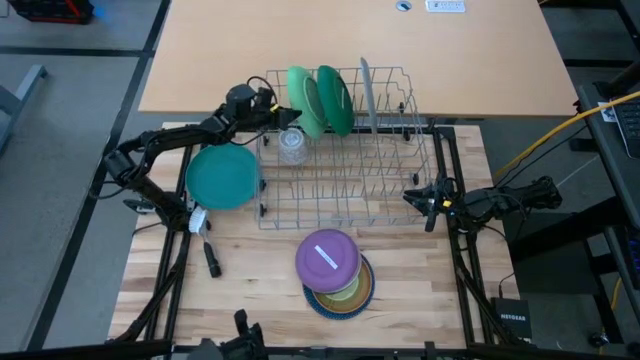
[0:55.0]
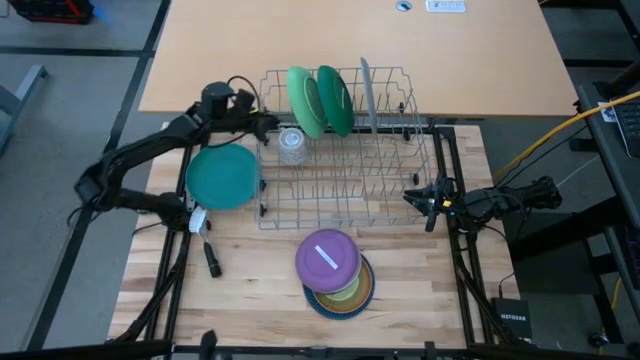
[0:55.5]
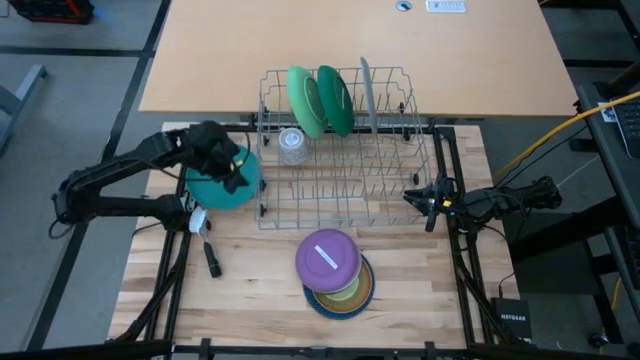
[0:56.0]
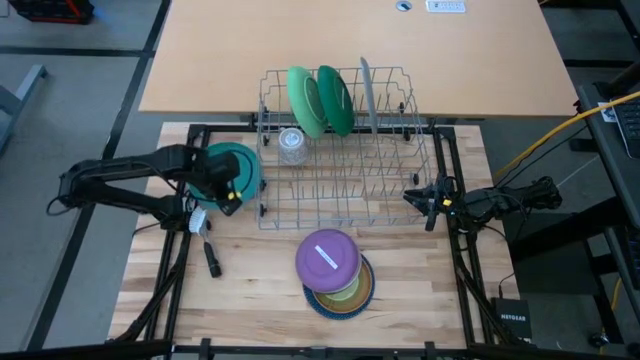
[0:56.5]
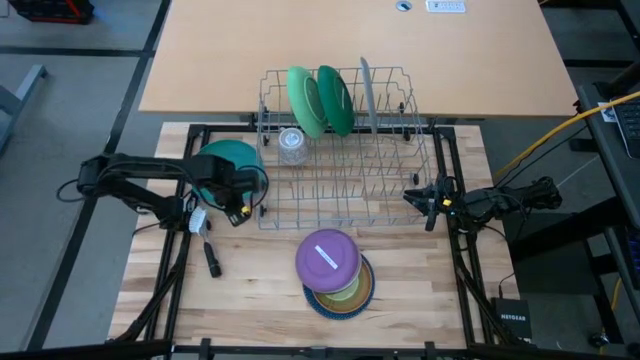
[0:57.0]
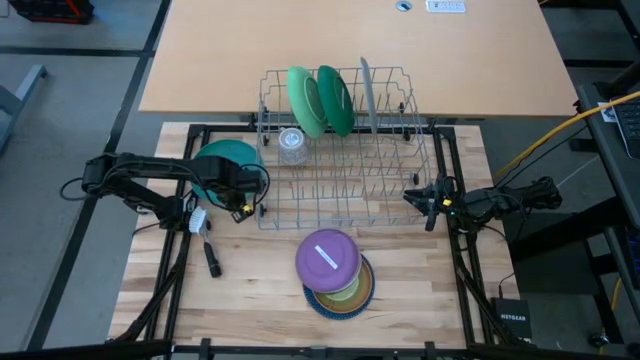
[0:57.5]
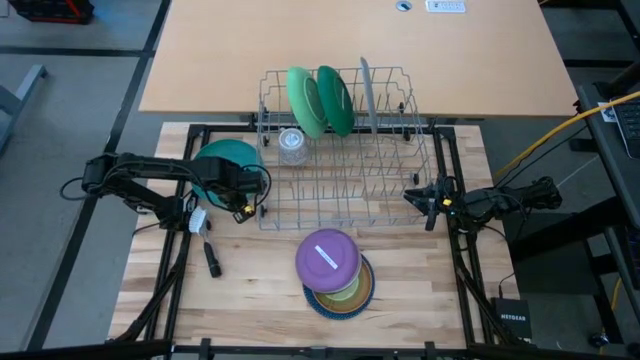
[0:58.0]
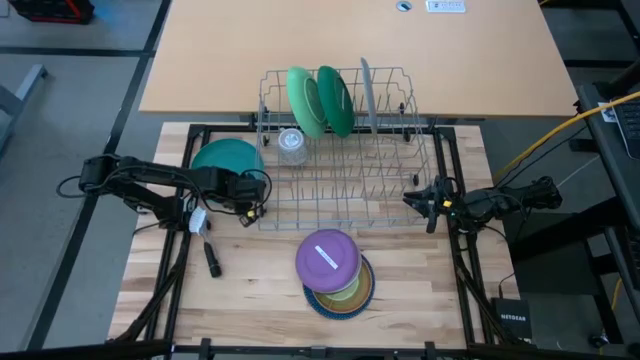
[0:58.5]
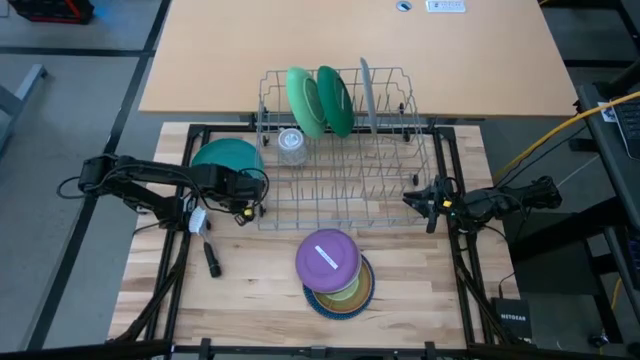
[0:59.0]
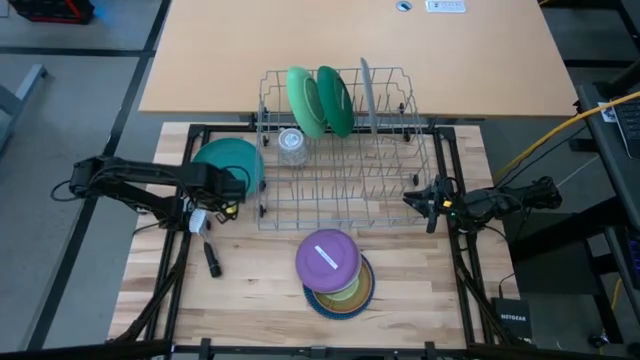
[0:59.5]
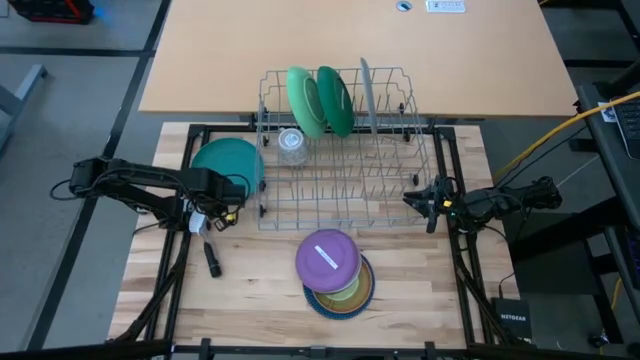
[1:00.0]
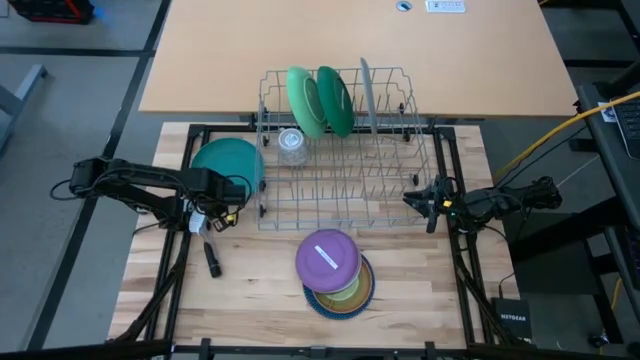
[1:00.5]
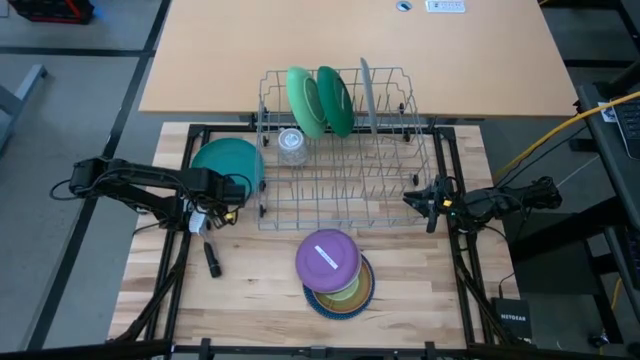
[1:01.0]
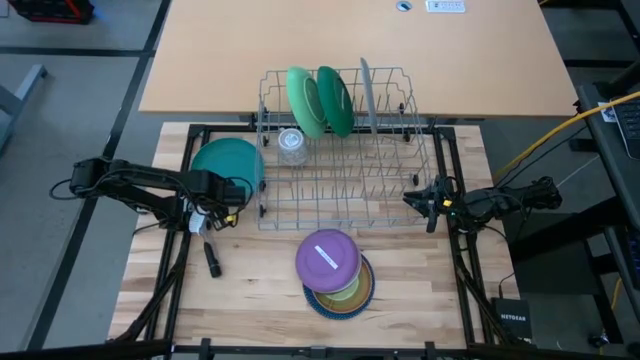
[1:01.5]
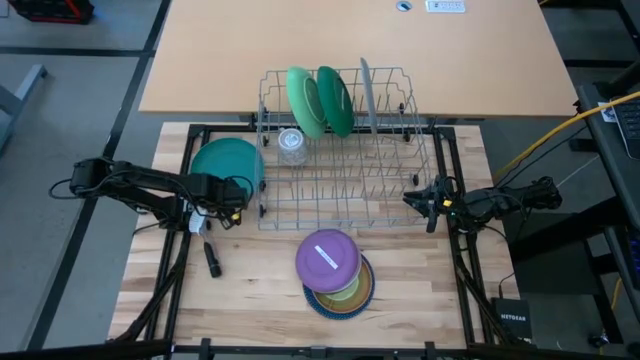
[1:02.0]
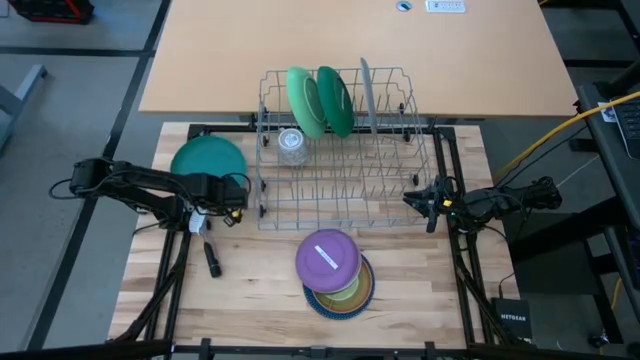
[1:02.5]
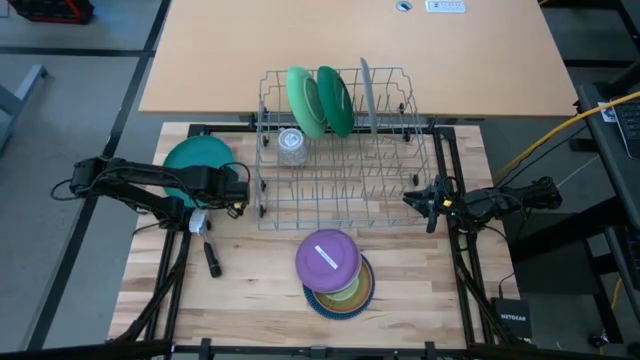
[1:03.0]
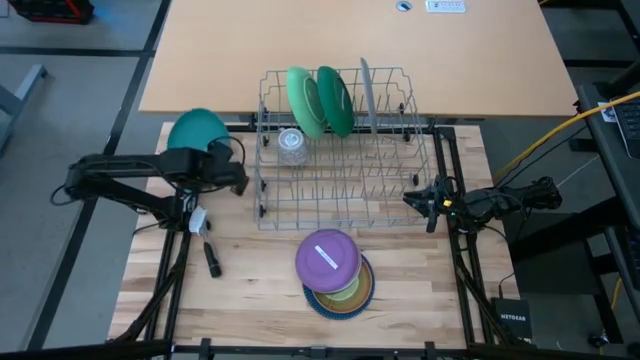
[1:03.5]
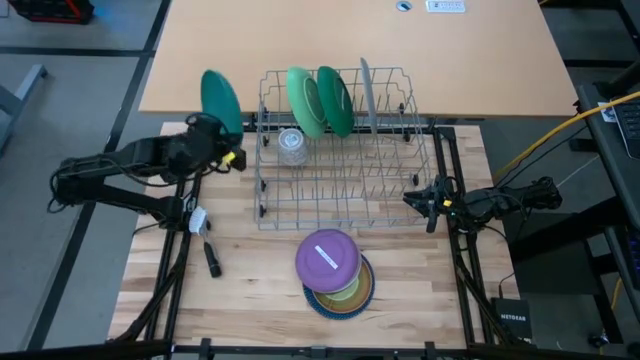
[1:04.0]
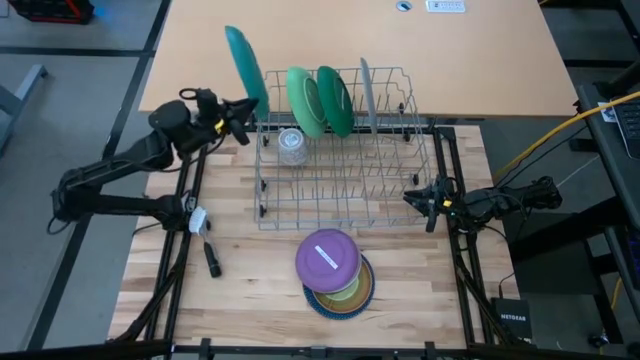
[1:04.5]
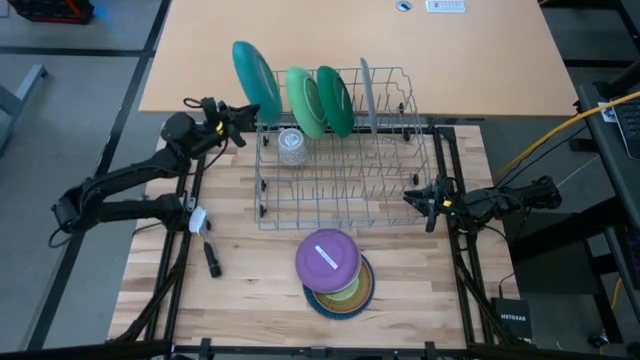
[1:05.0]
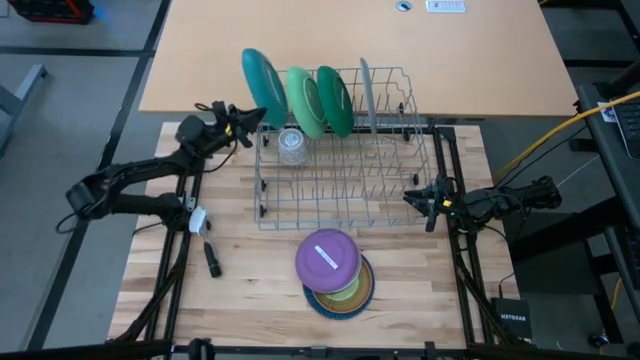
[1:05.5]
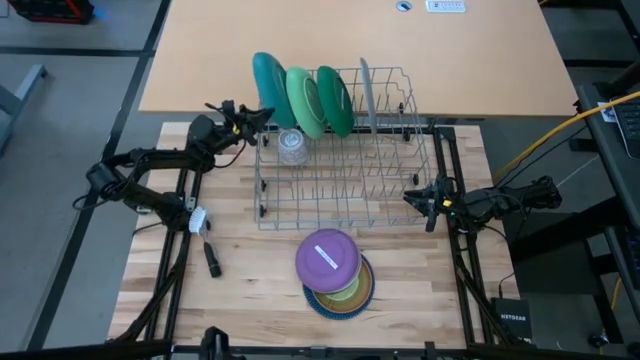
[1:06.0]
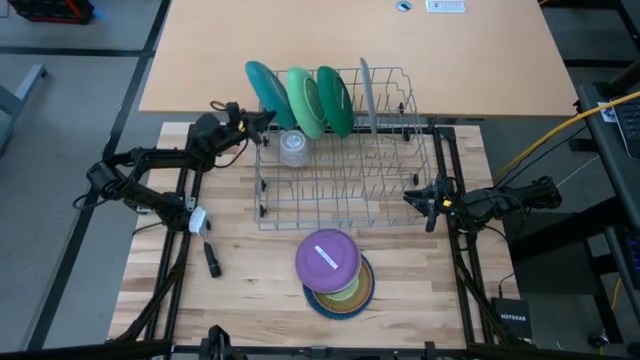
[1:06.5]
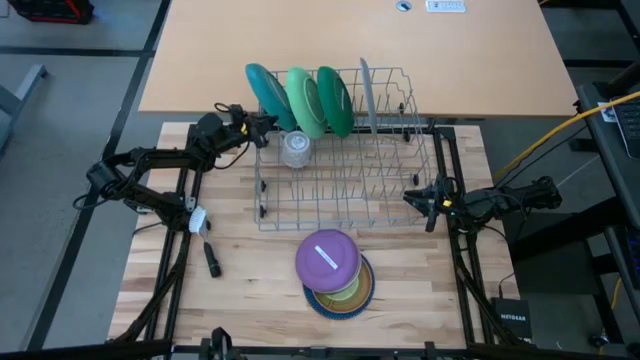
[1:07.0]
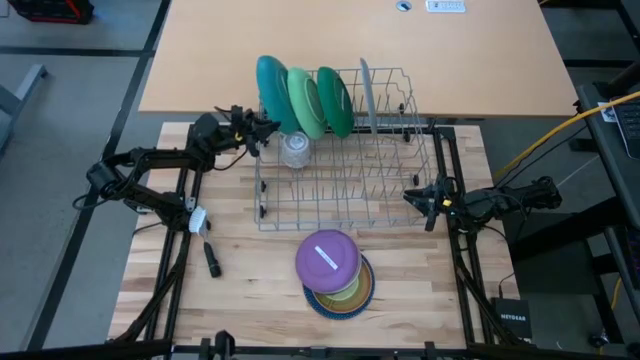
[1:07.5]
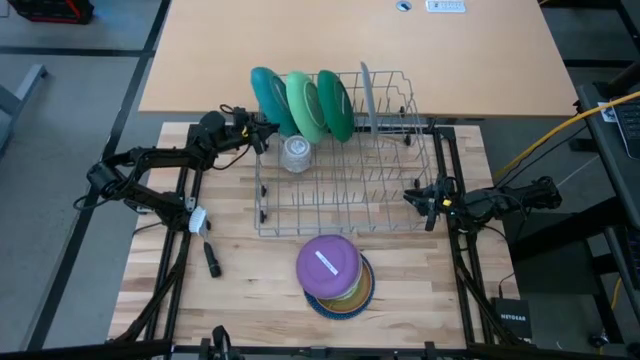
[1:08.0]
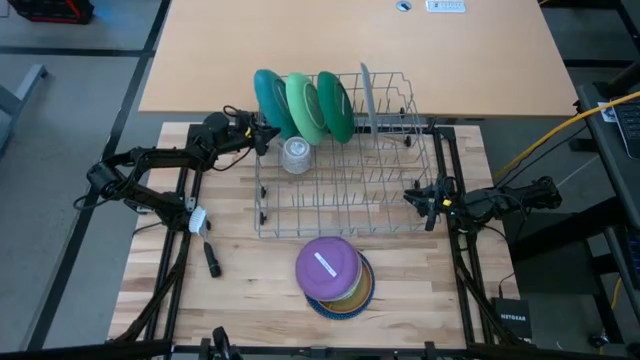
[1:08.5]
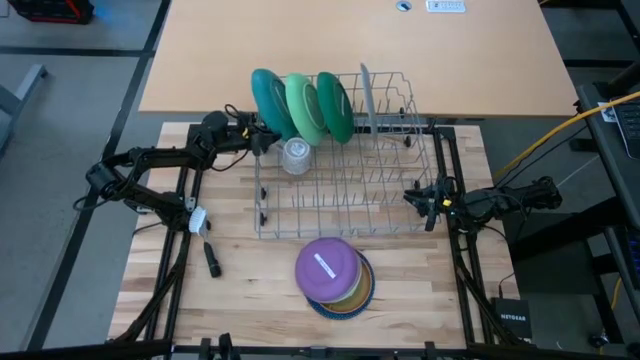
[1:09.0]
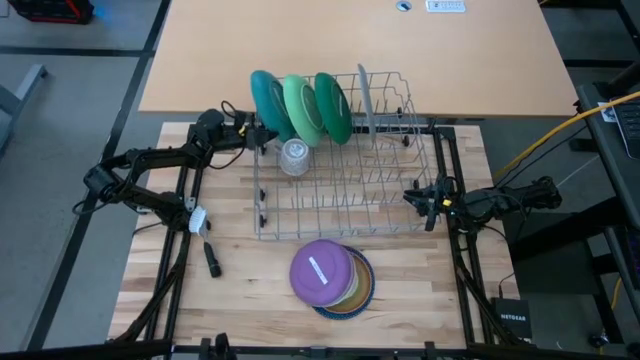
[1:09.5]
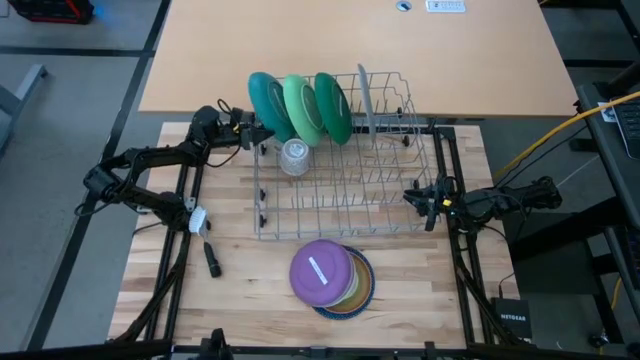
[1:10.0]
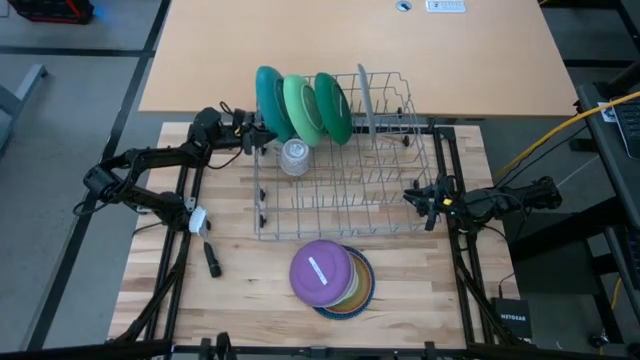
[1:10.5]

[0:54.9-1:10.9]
Task: Sort dishes
Put the dark green plate in the dish rack

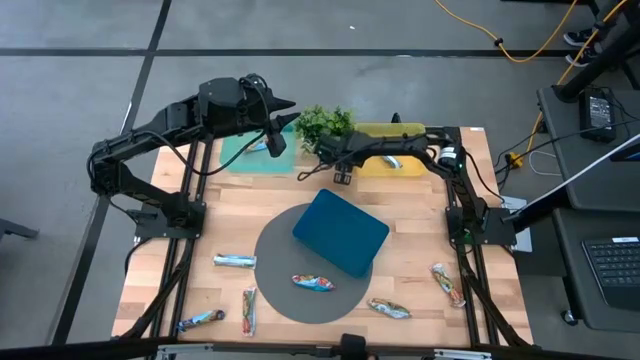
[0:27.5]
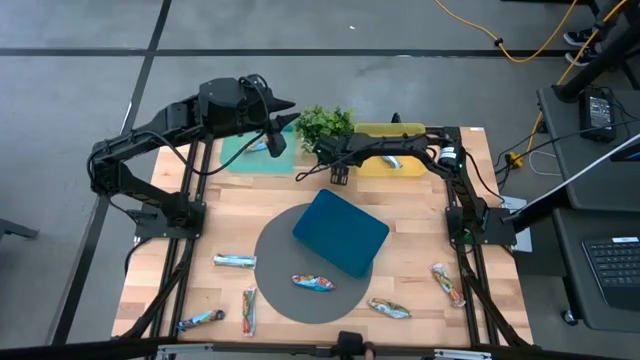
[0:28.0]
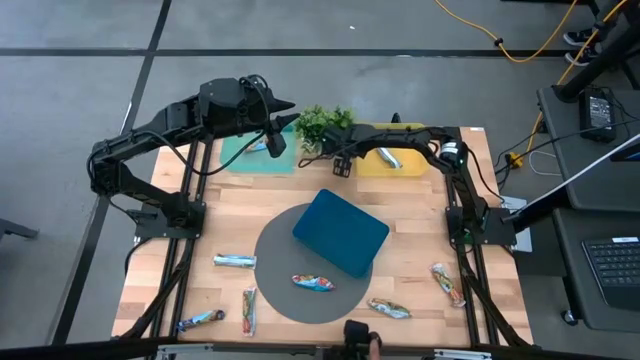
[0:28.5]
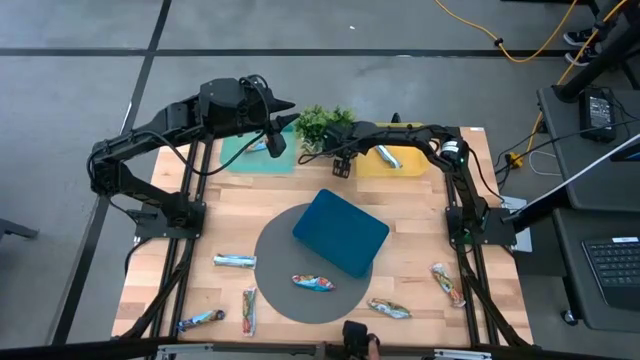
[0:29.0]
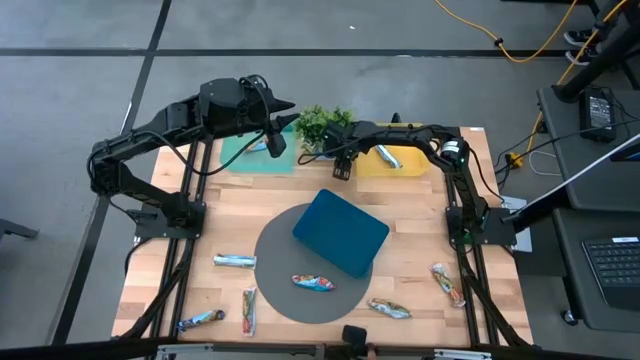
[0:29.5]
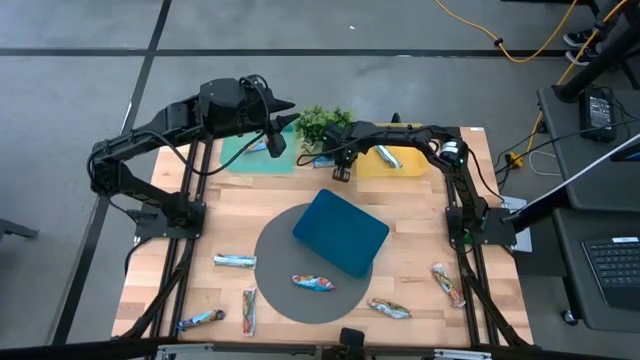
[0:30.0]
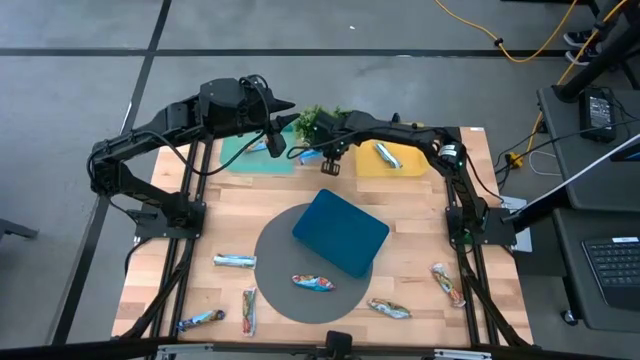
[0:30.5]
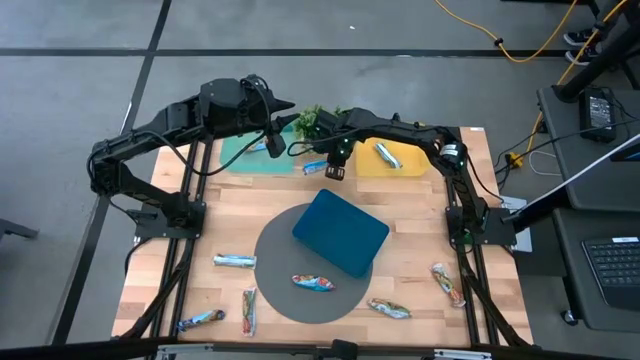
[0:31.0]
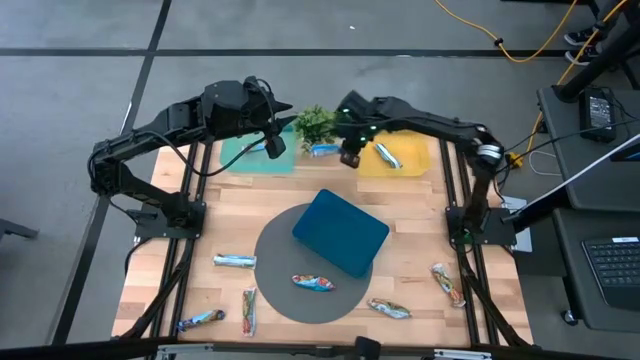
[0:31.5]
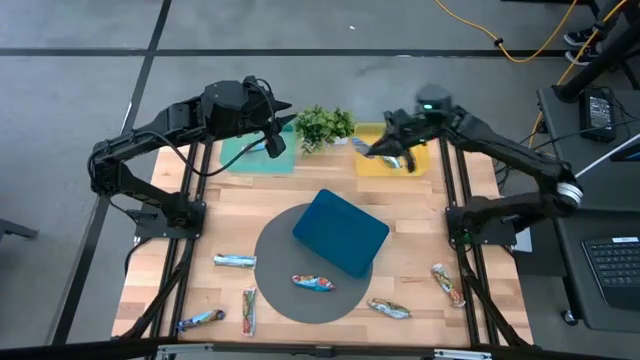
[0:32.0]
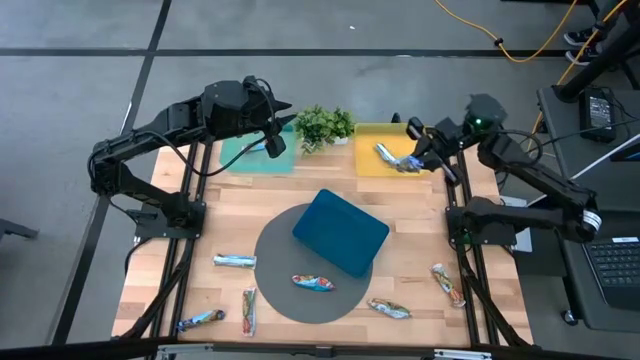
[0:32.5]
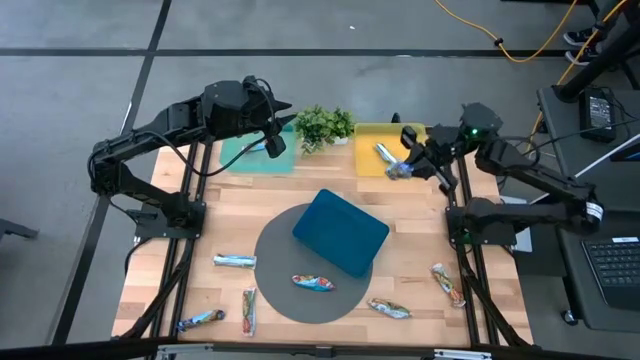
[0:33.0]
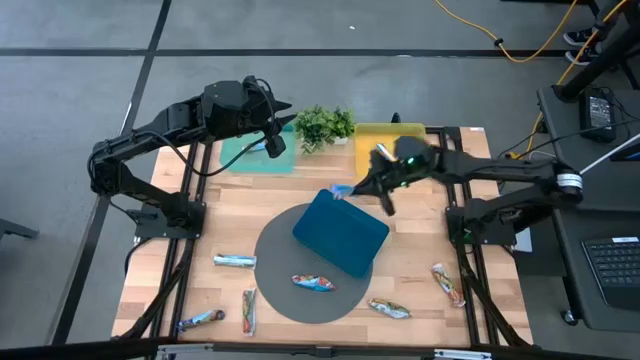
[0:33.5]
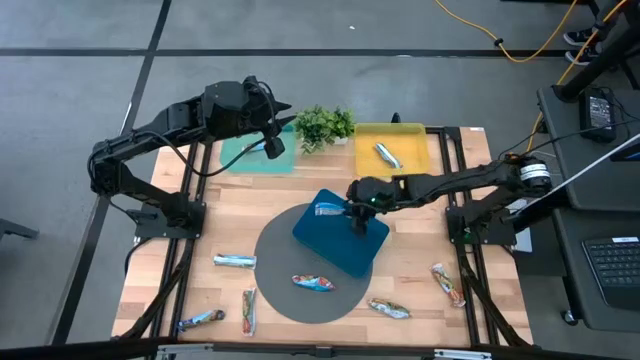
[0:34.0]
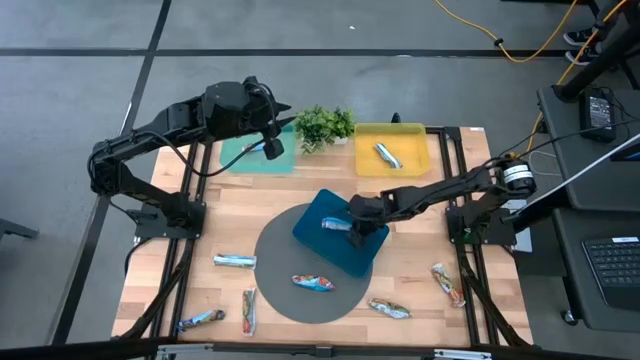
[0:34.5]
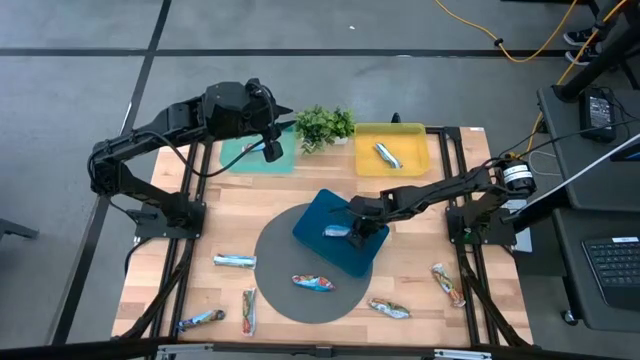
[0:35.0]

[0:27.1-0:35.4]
Task: Pick and place Granola Bars by type
Put the top blue granola bar into the blue bin
